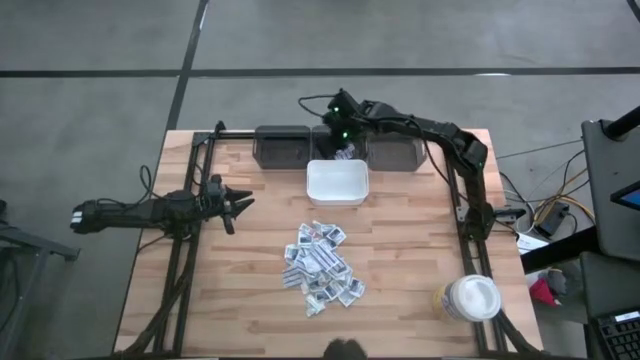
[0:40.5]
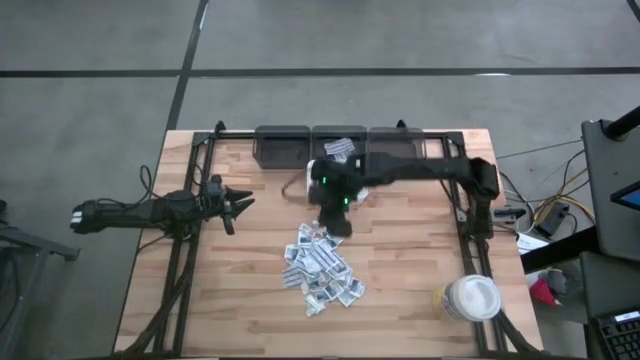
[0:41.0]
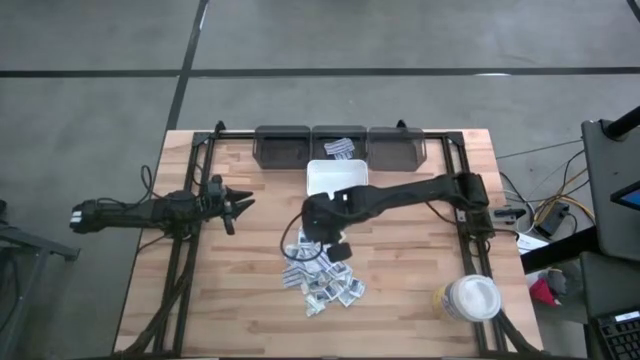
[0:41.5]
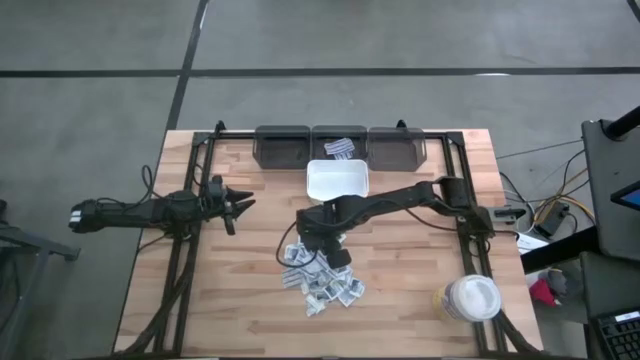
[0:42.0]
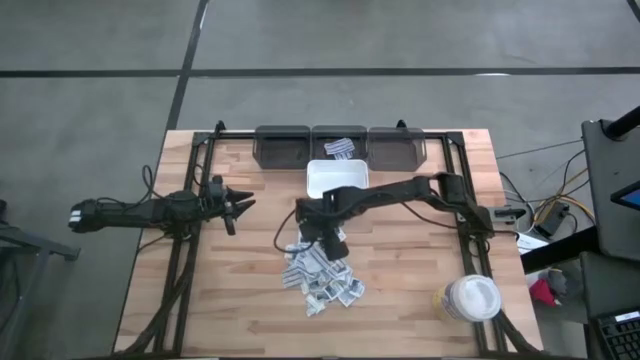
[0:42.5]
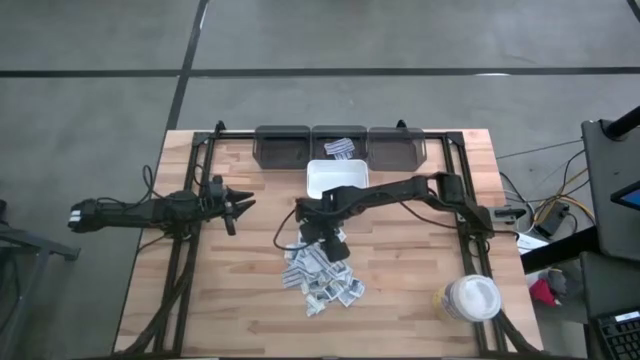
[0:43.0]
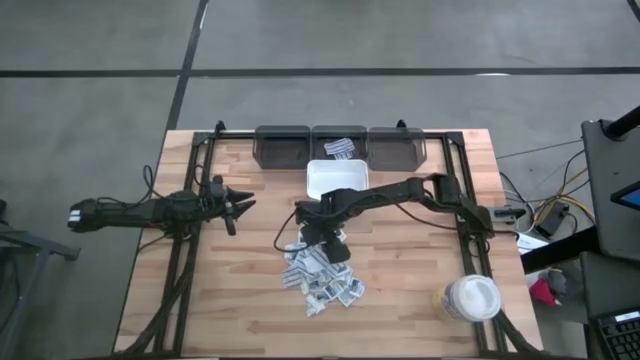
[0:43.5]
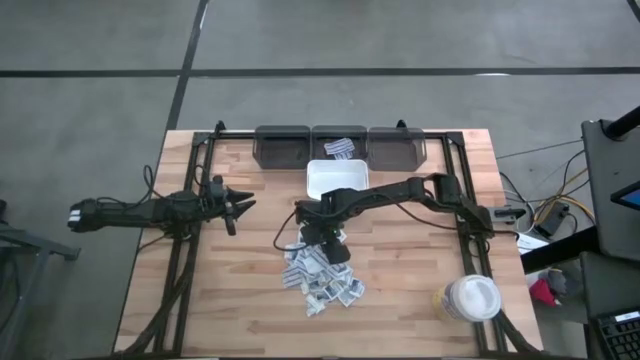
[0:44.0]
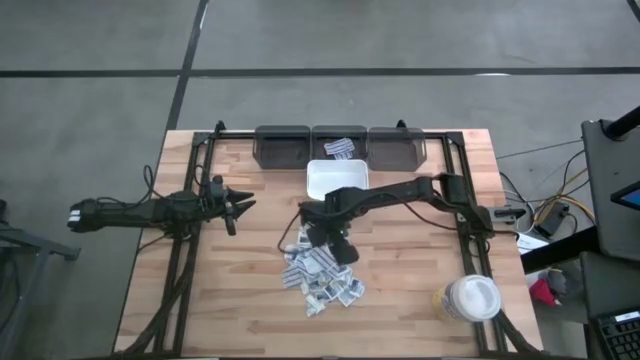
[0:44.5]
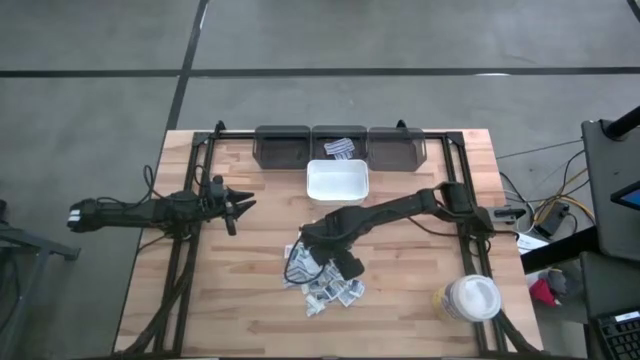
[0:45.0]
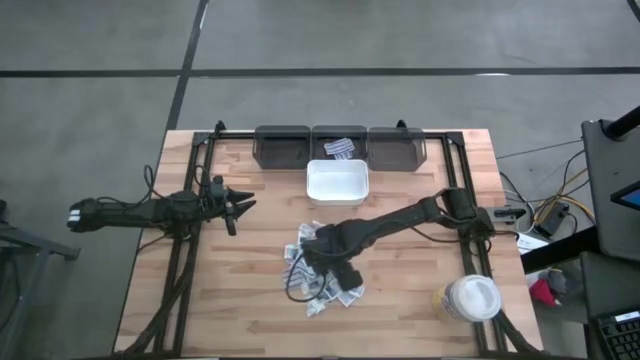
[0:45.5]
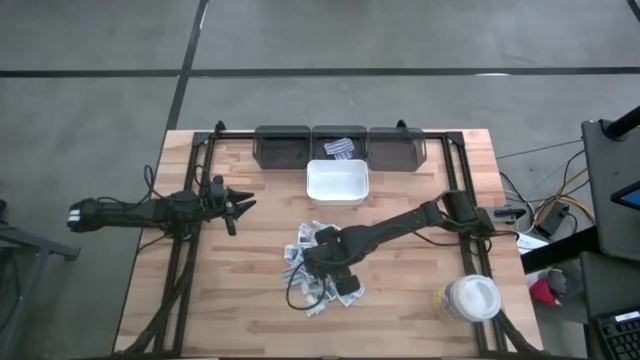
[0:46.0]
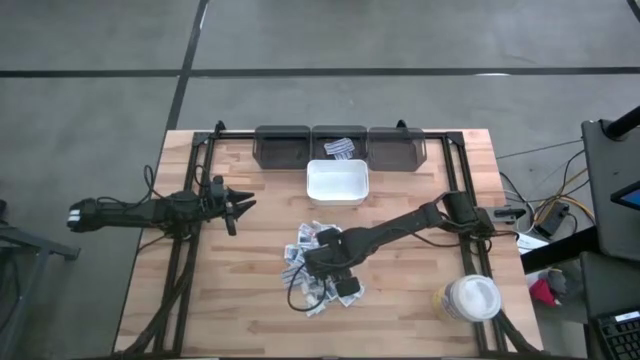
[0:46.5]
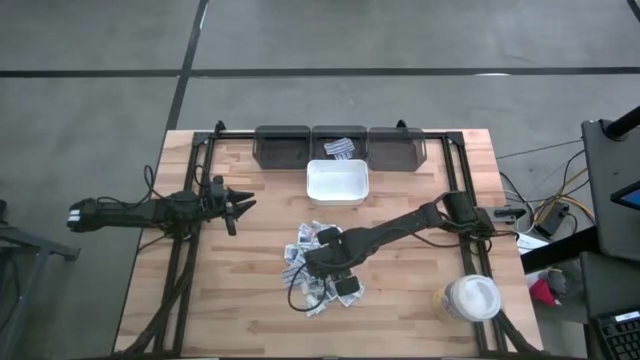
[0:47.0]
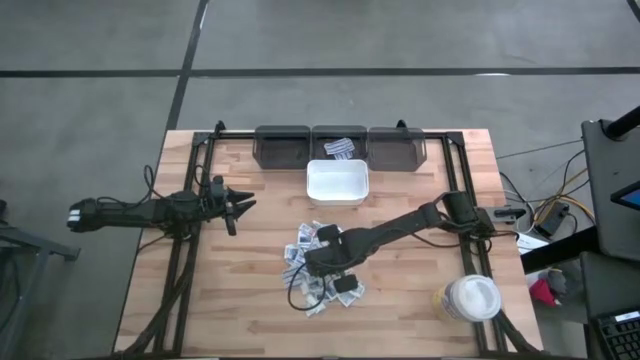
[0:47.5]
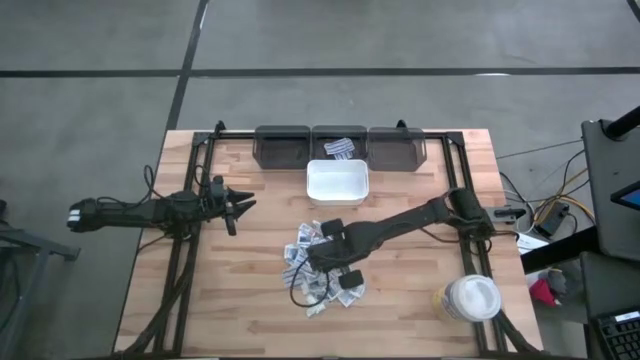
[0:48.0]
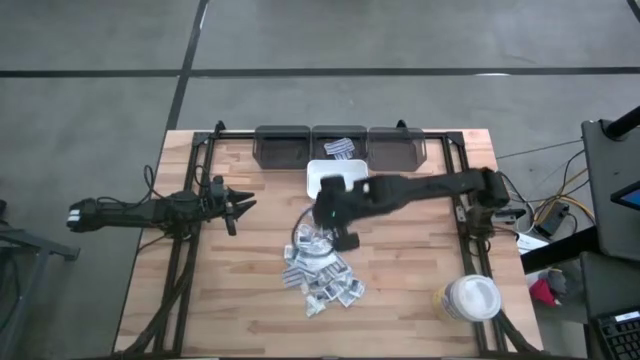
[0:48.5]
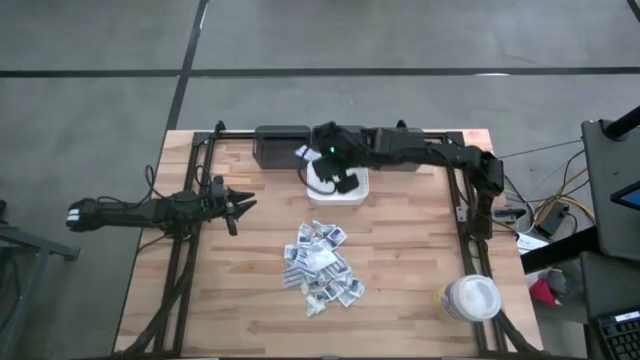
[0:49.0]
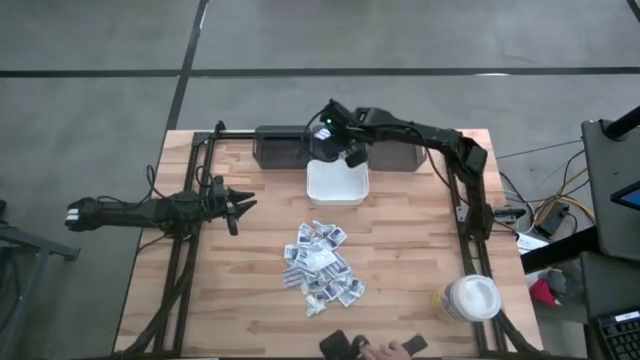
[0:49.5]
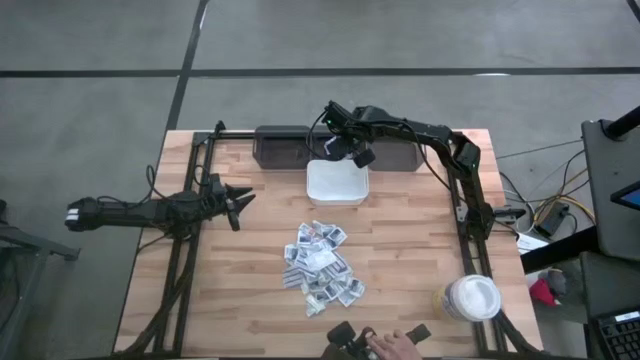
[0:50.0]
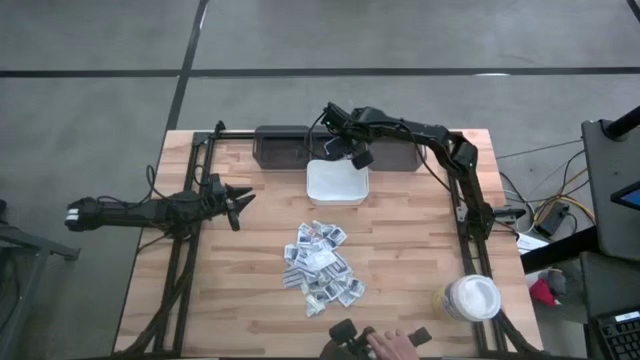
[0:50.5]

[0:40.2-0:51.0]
Task: Pick & Place First Aid Supplies
Put the blue bandage into the middle black bin

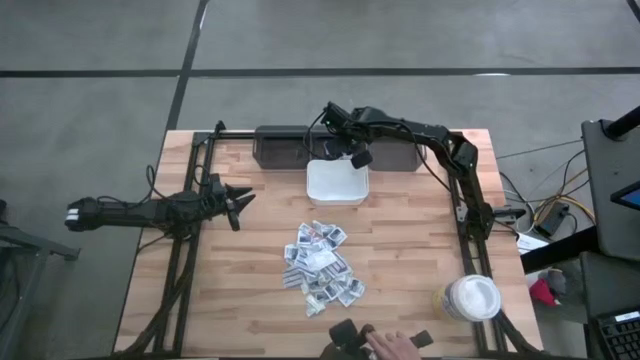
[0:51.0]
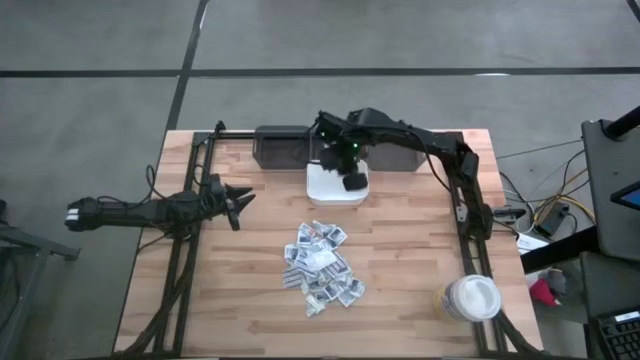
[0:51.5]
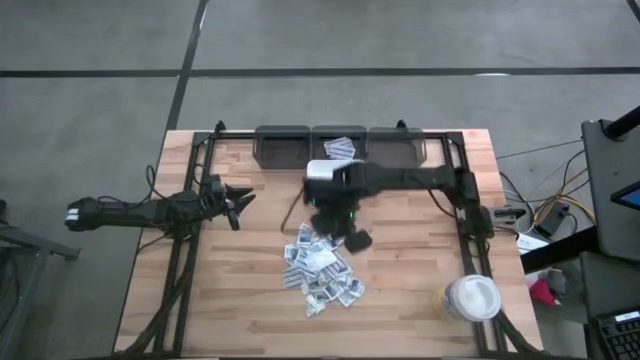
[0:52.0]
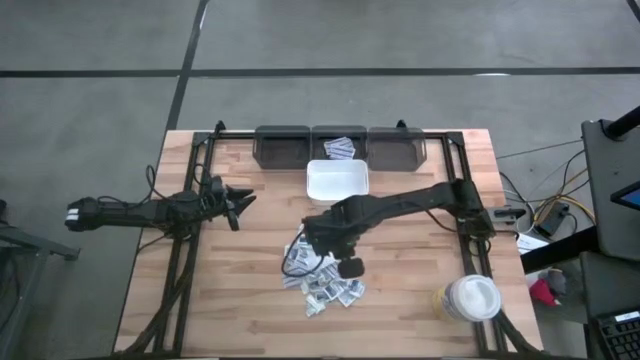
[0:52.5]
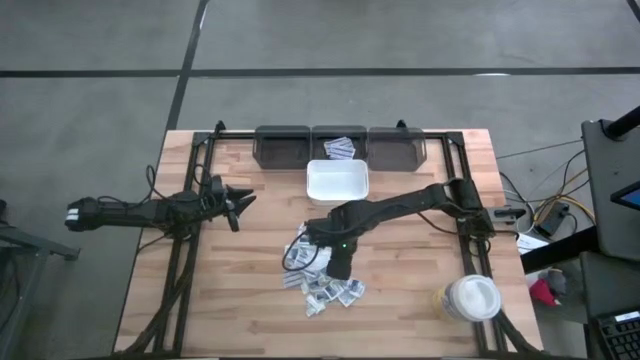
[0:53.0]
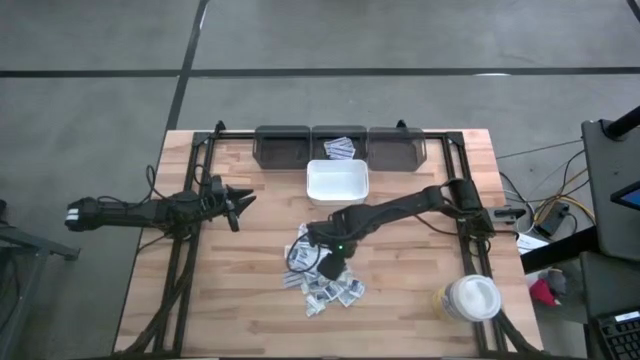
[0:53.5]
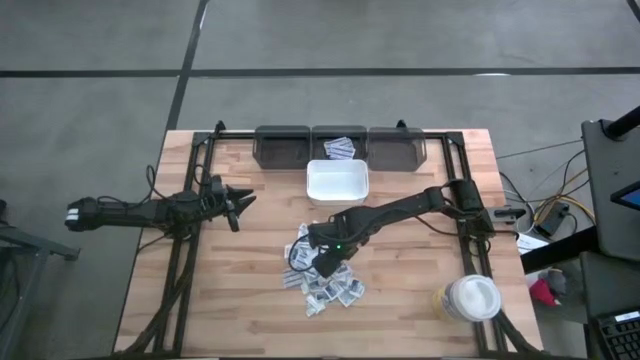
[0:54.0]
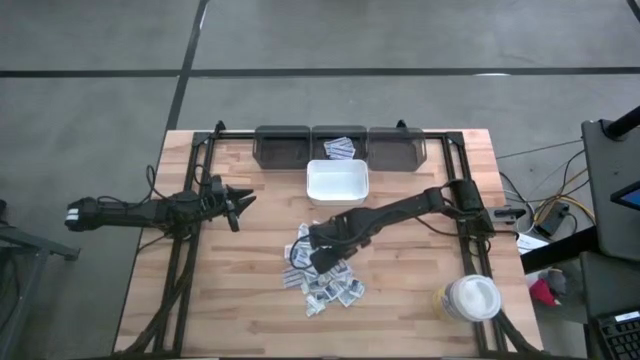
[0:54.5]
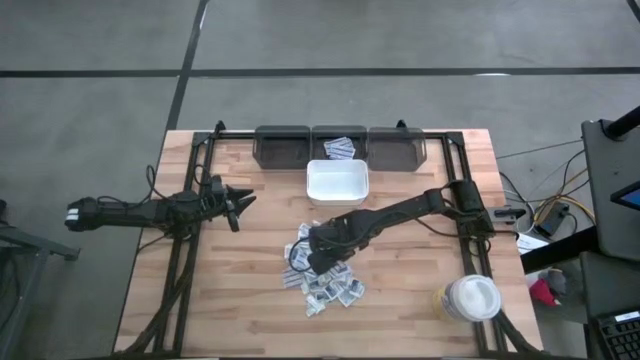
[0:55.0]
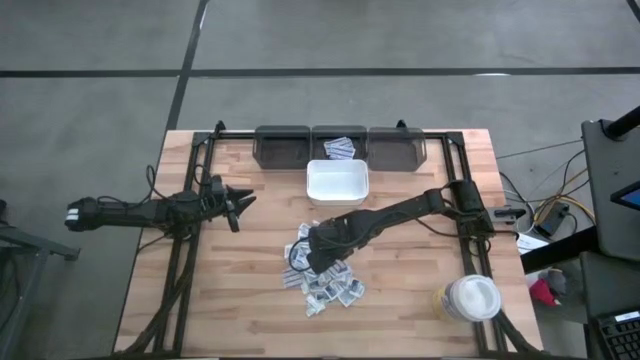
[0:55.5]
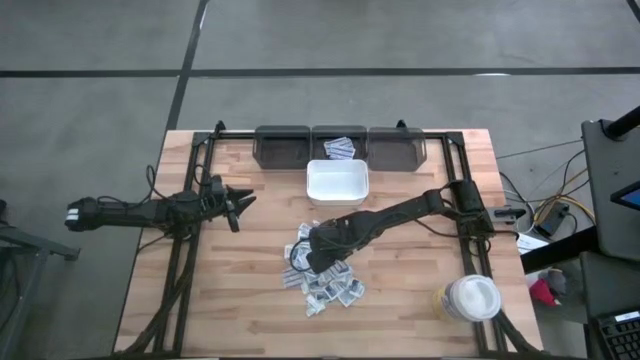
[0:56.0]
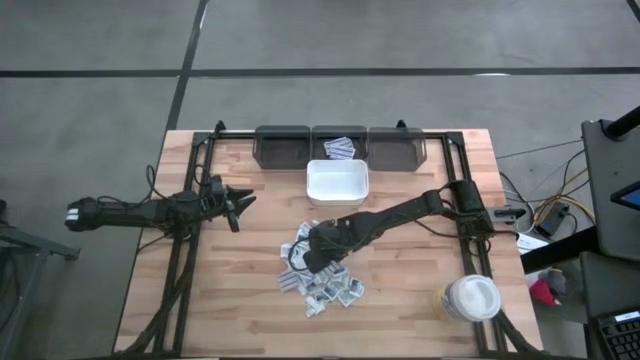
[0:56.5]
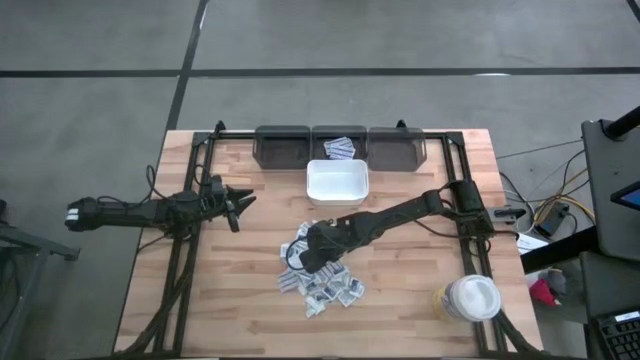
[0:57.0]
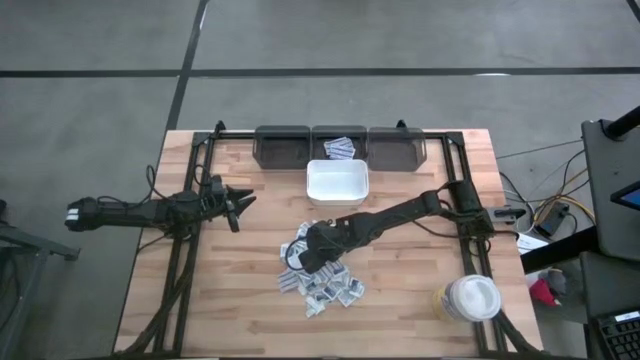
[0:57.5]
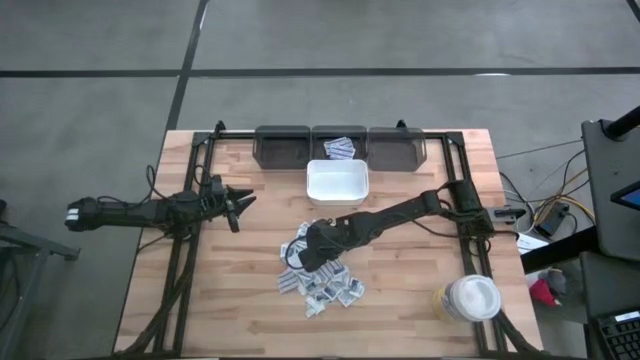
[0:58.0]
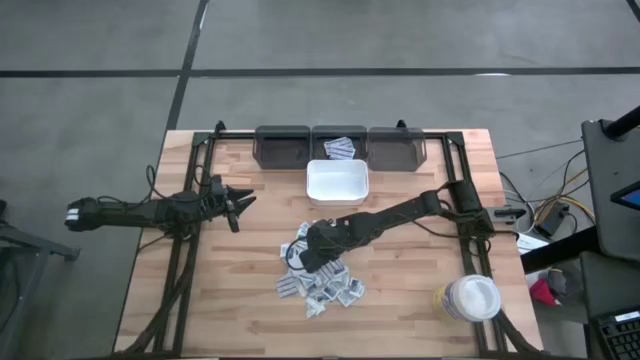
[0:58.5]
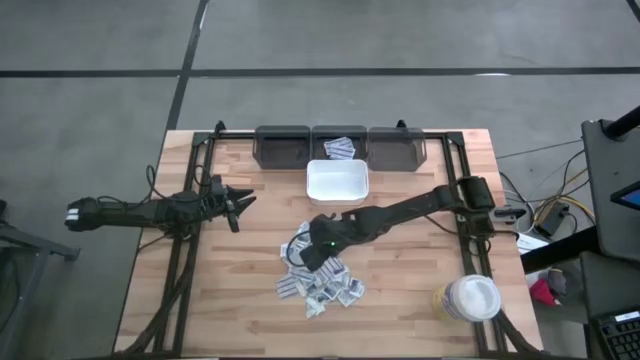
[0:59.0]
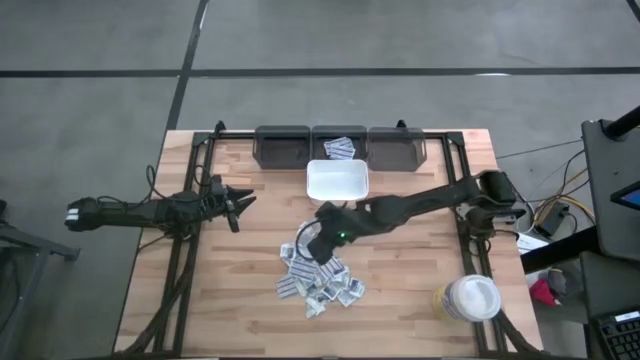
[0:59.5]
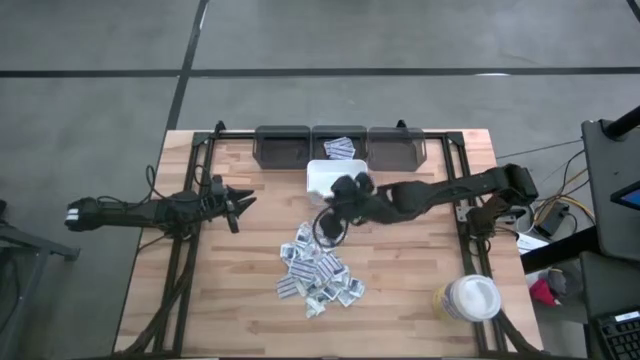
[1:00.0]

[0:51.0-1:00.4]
Put the blue bandage into the middle black bin

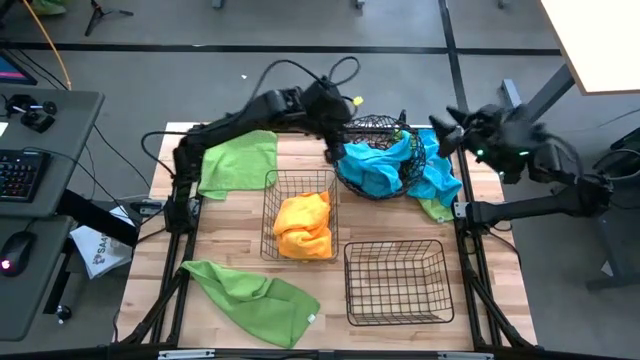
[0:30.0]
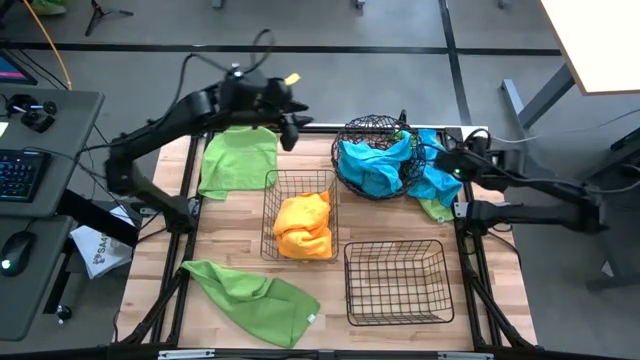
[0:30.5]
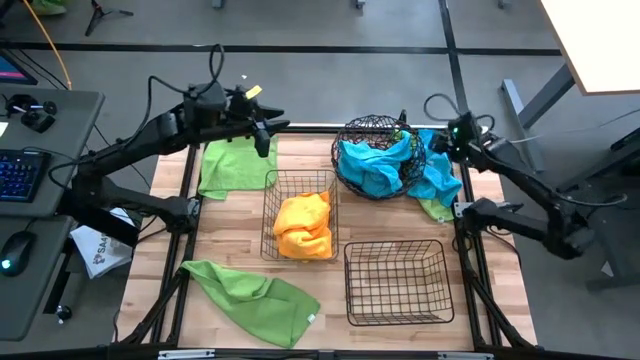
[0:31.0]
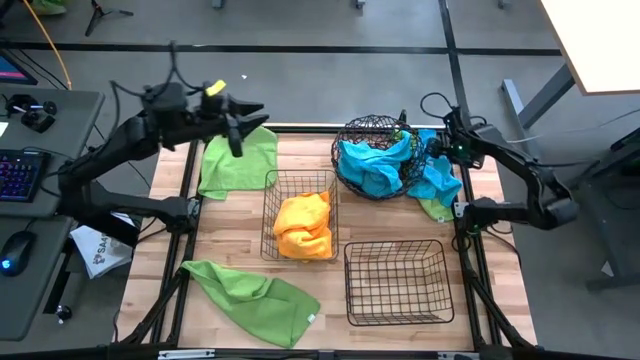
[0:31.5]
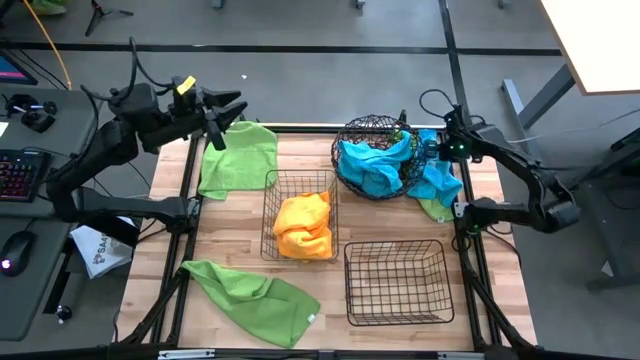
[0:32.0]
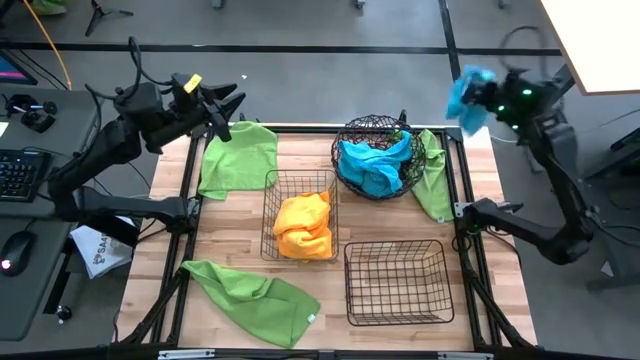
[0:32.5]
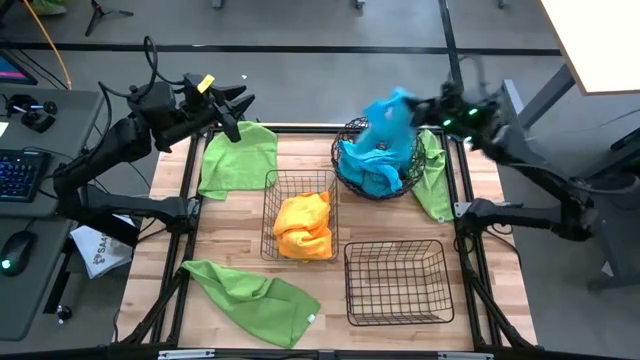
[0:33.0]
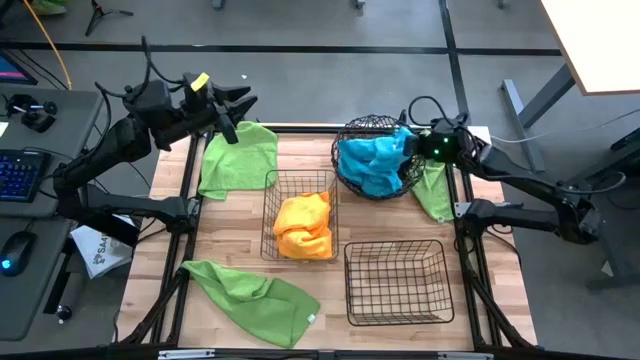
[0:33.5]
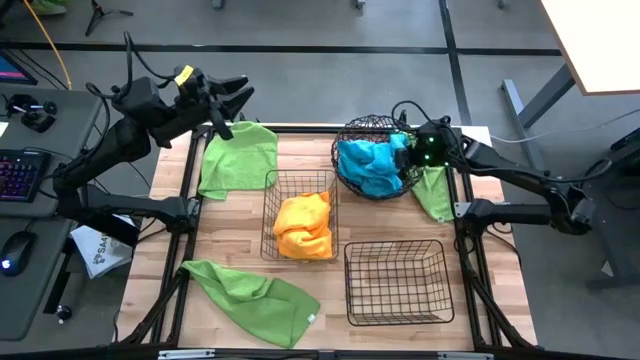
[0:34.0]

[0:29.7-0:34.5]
Task: Sort microfiber towel by color & place in baskets
Put the blue microfiber towel into the top right black metal basket
